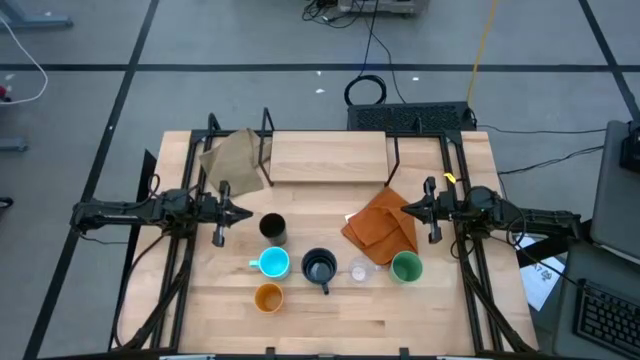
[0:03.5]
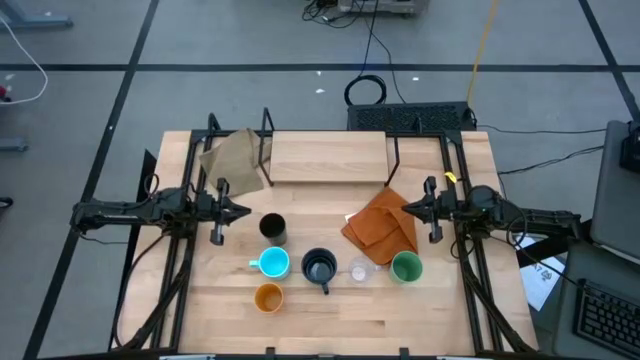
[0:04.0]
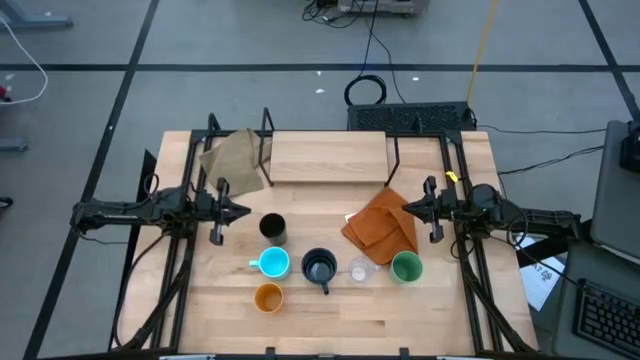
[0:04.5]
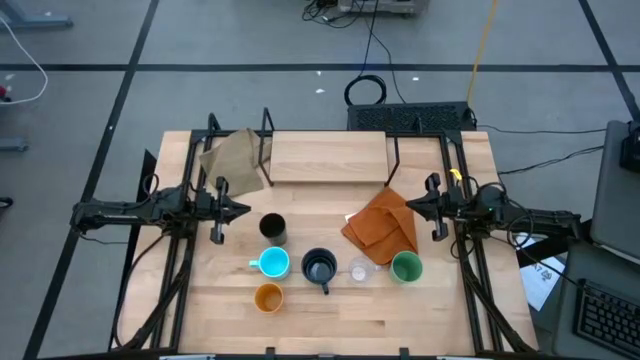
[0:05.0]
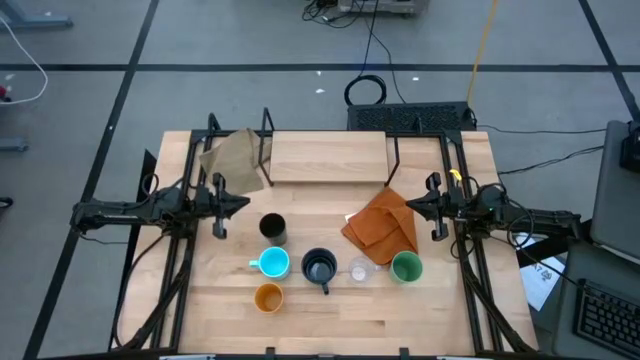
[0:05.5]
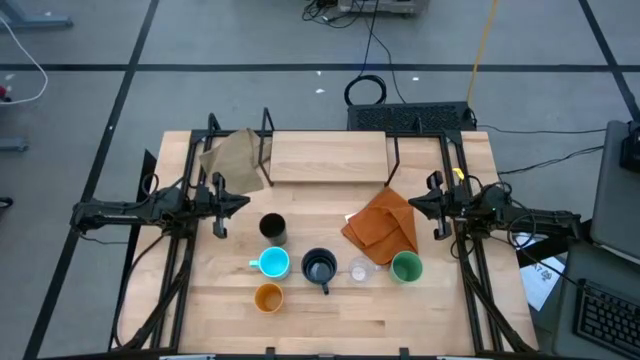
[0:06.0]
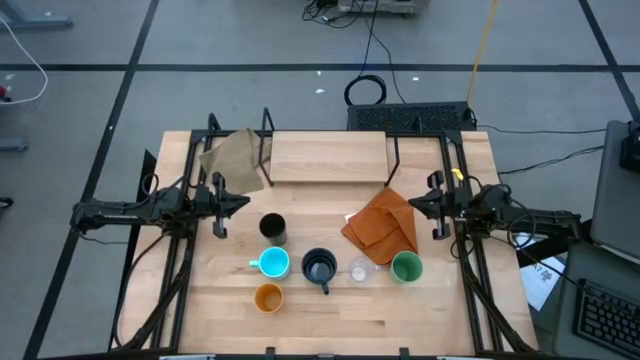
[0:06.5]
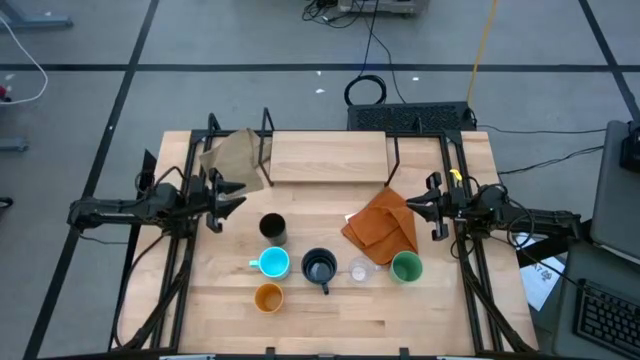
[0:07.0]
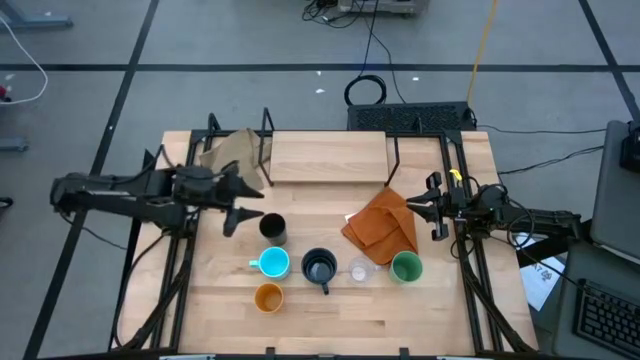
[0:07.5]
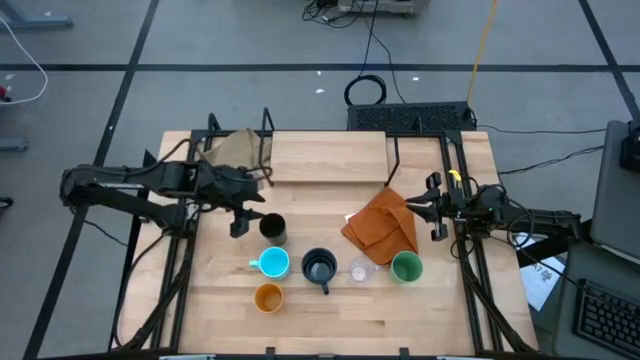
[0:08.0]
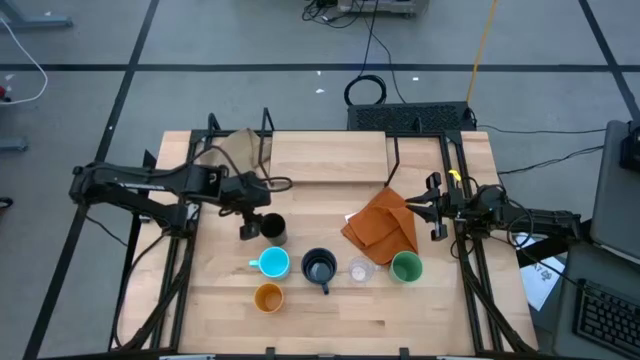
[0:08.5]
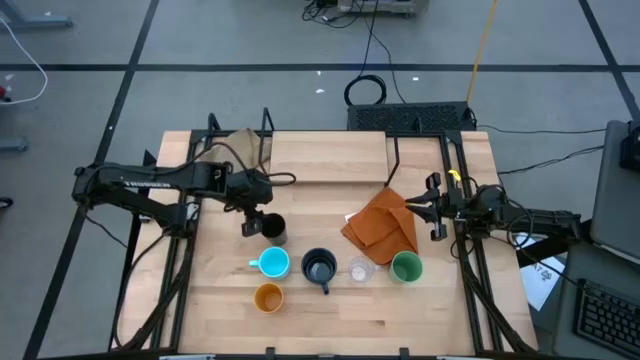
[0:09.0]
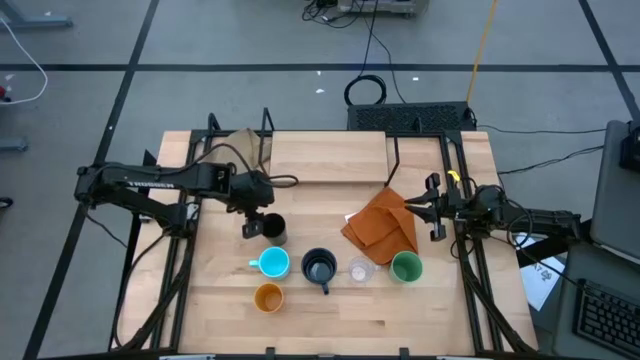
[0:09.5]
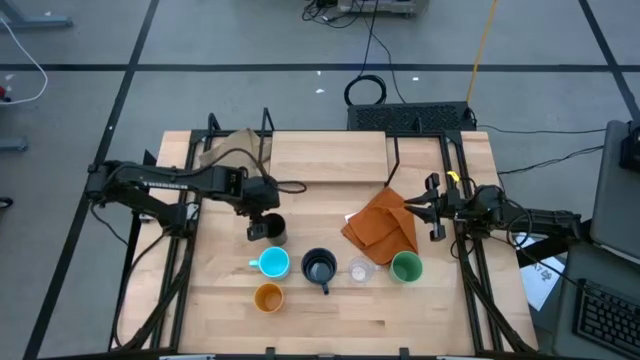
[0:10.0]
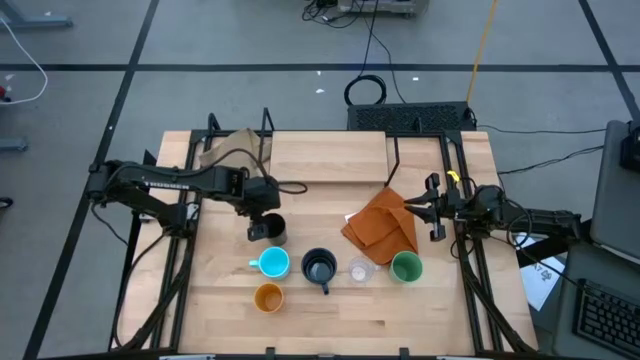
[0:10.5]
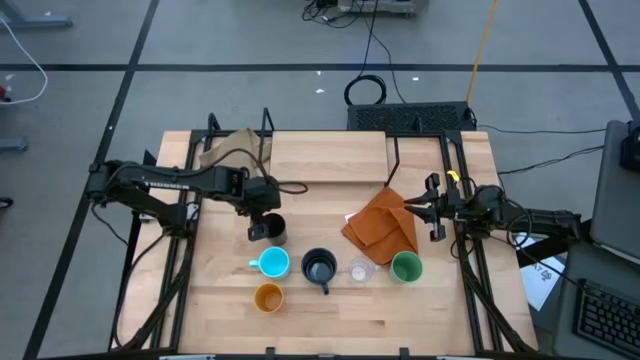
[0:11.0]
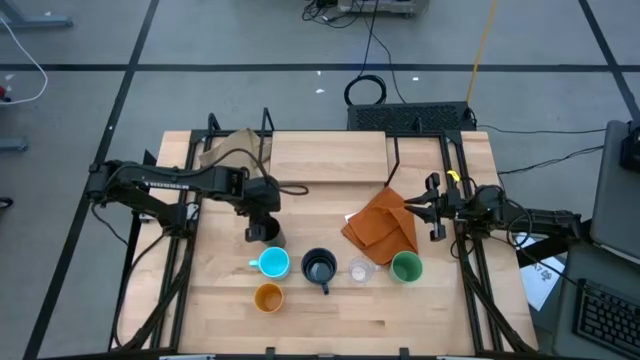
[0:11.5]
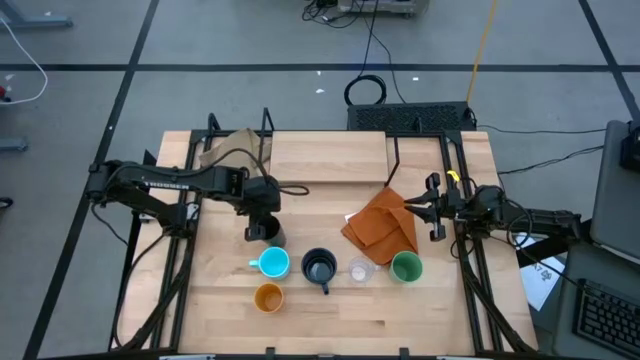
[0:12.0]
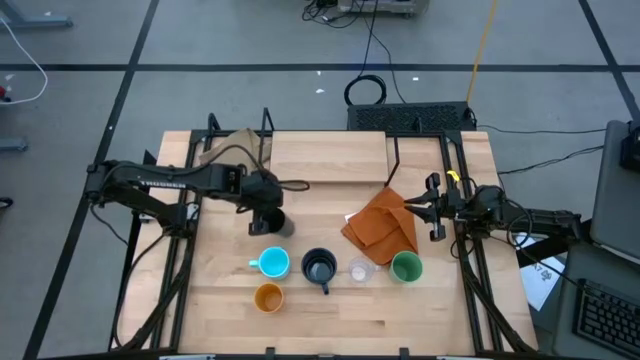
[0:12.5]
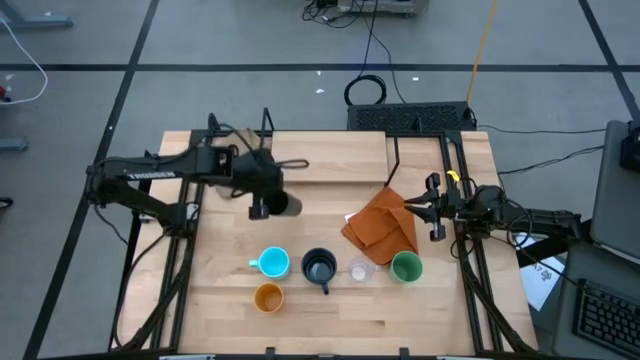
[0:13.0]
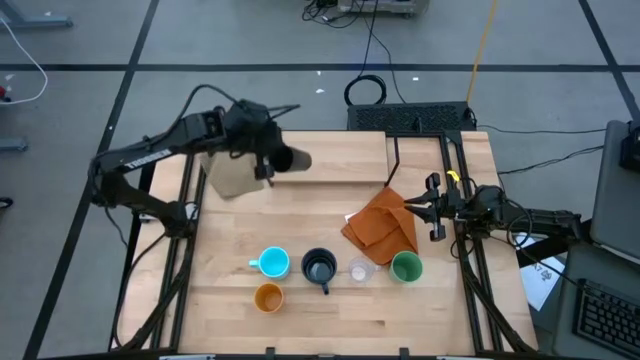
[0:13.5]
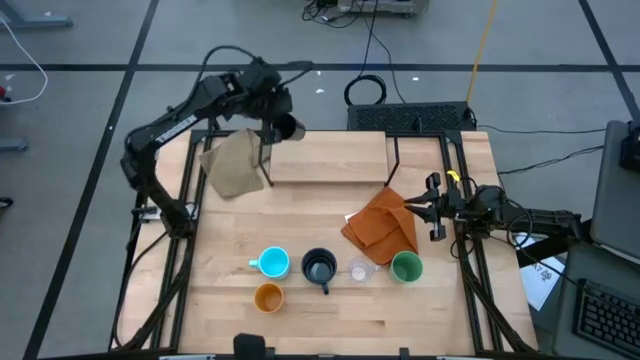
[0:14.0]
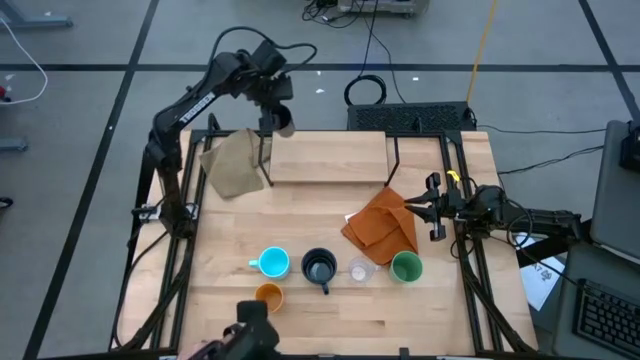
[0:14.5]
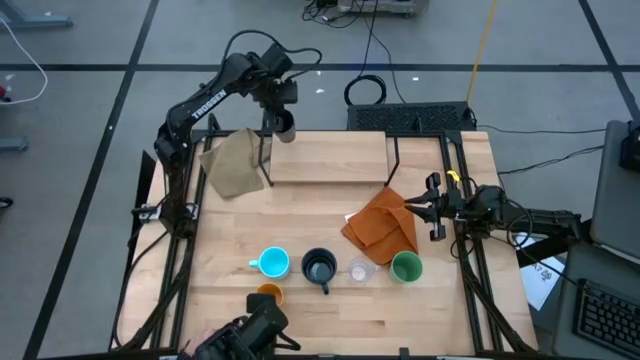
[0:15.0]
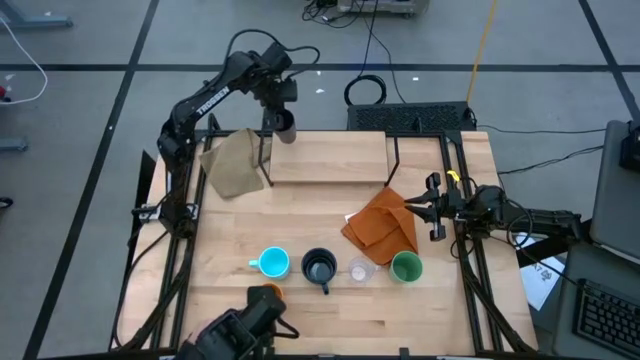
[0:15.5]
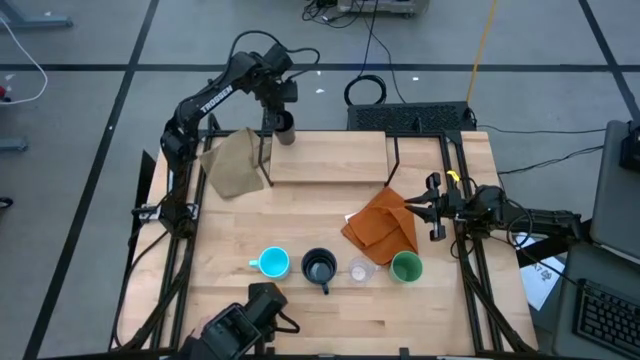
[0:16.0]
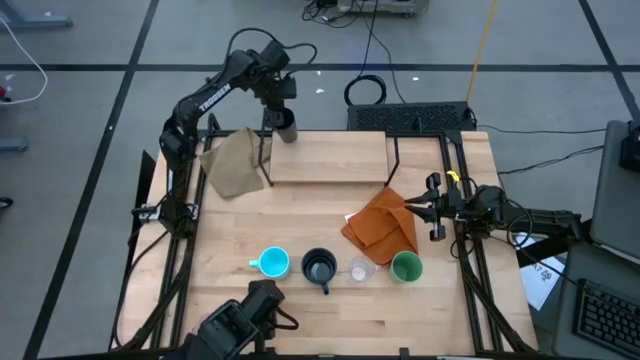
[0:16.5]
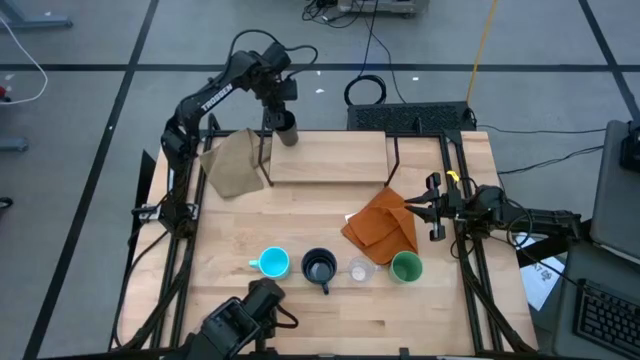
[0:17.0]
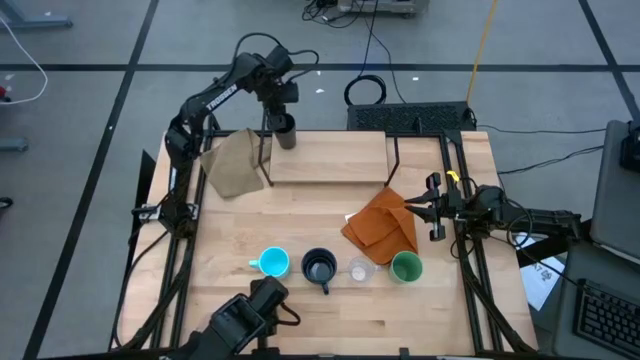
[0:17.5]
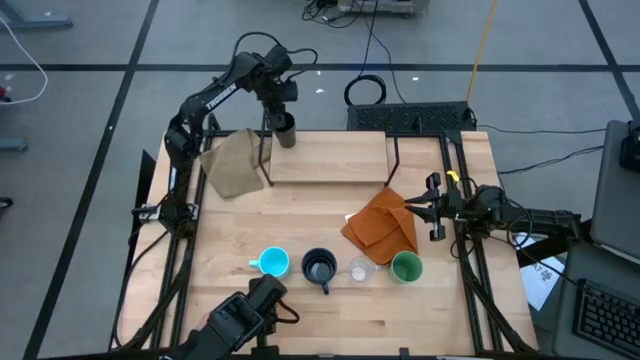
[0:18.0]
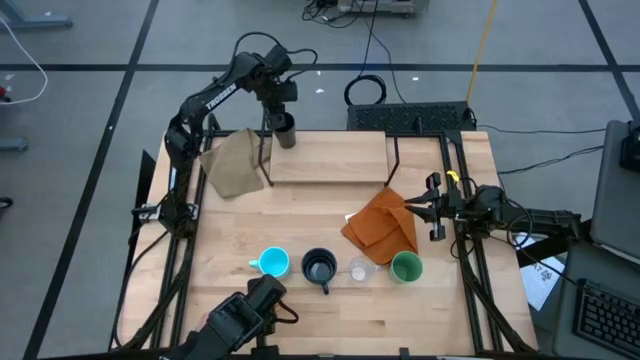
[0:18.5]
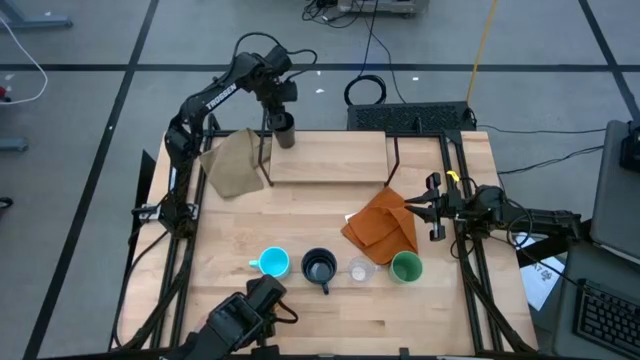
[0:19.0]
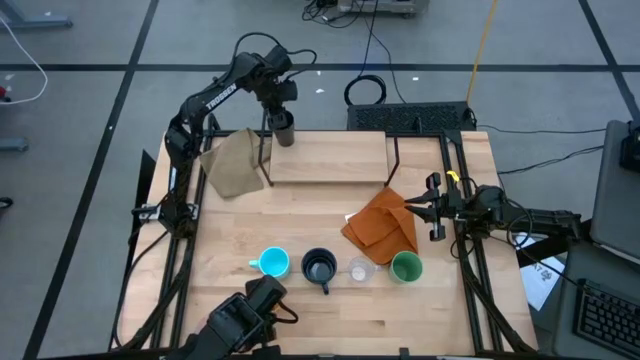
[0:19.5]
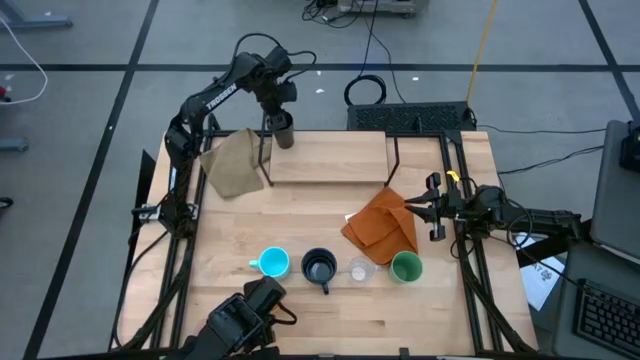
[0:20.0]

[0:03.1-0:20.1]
Task: Stack small to large cups/mugs on shelf
Put the black cup on the shelf

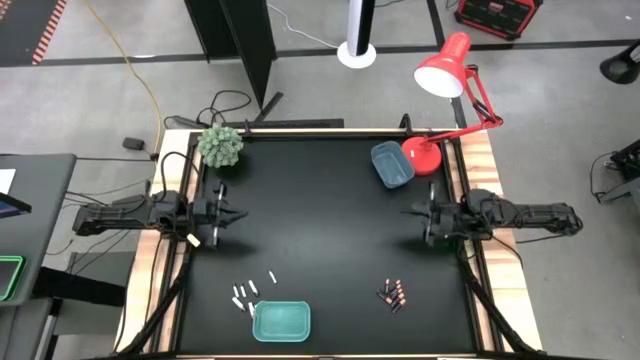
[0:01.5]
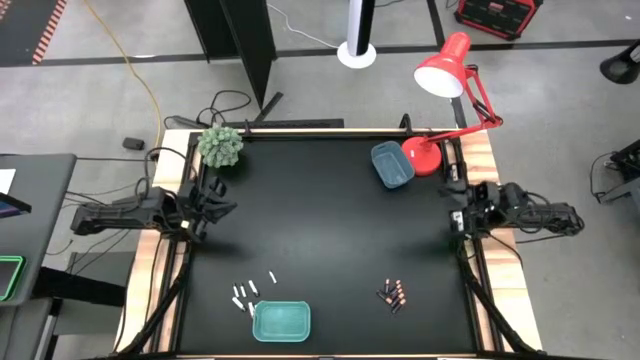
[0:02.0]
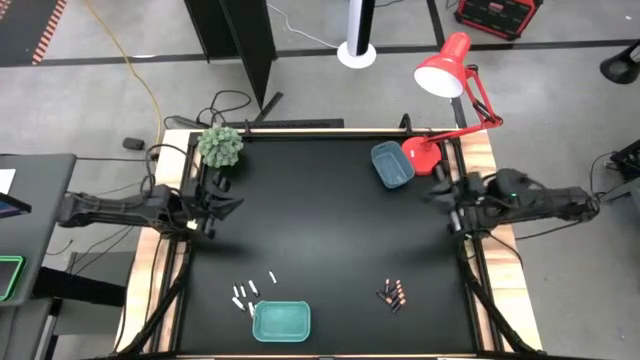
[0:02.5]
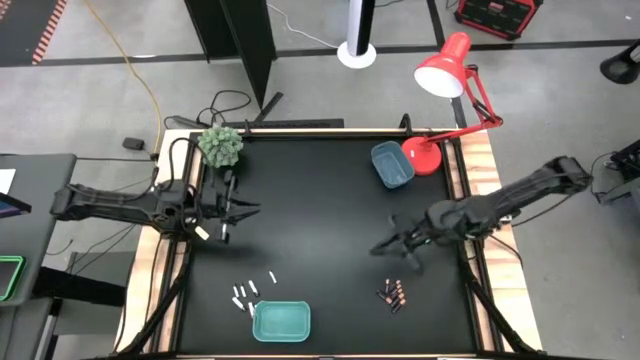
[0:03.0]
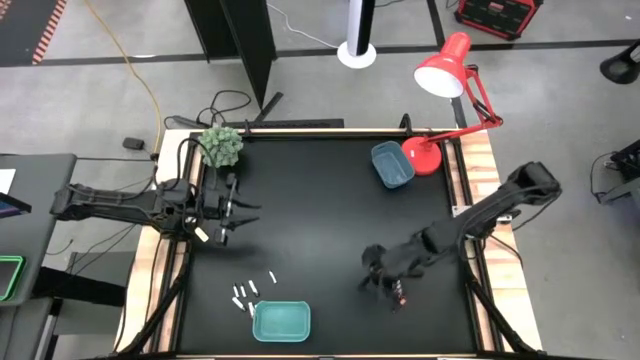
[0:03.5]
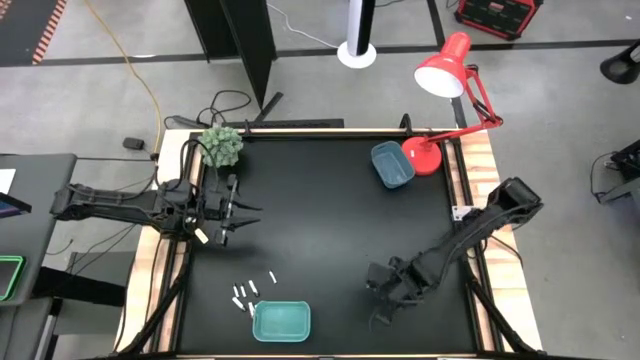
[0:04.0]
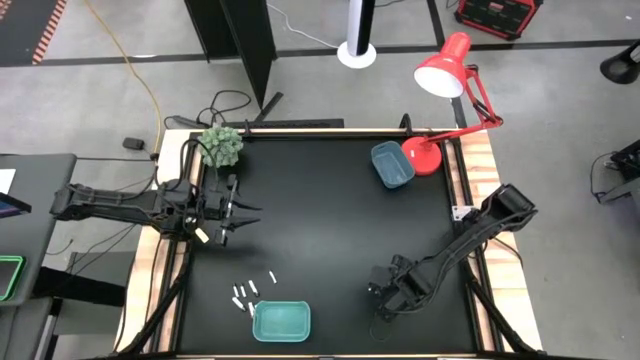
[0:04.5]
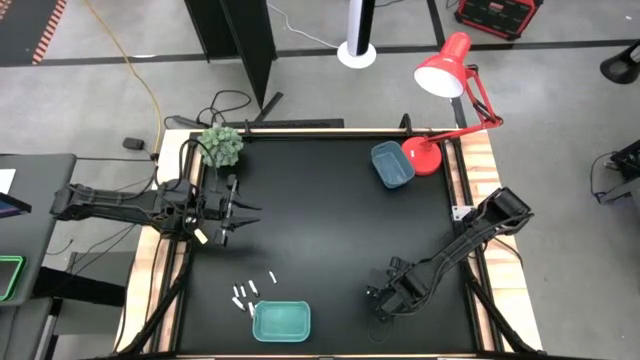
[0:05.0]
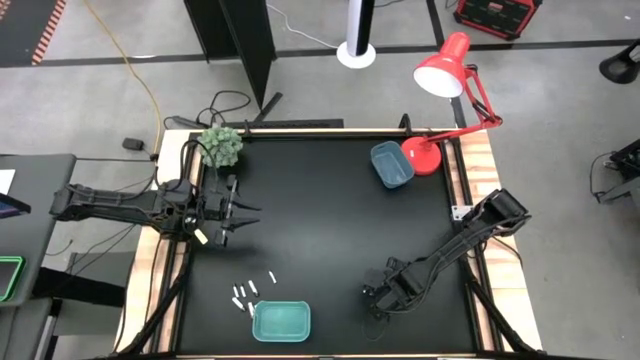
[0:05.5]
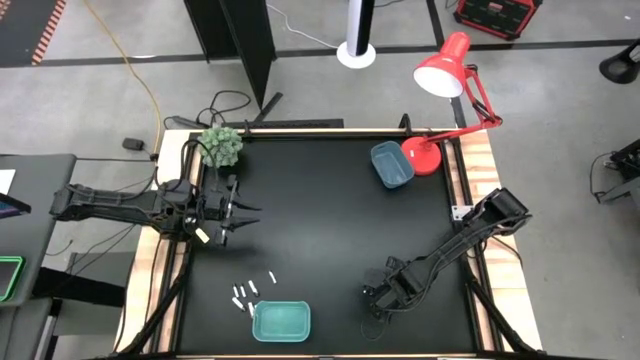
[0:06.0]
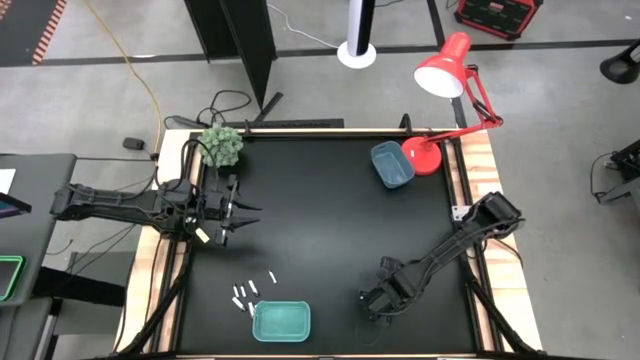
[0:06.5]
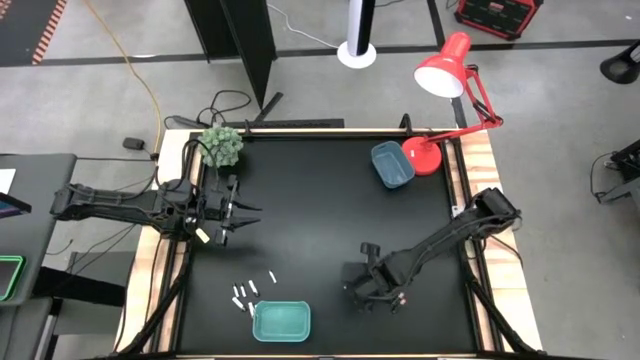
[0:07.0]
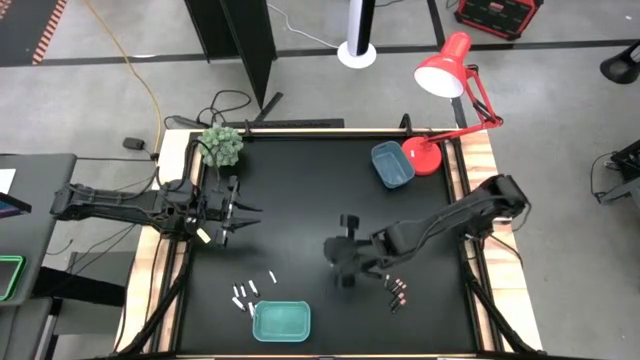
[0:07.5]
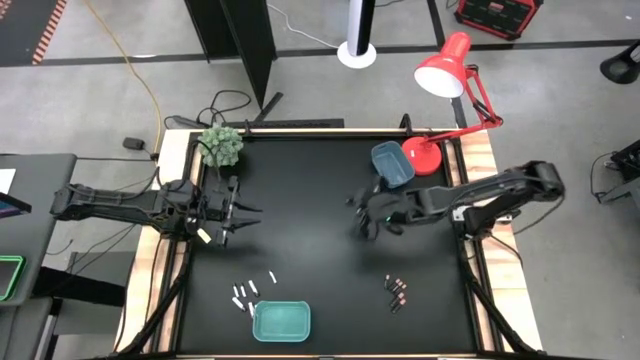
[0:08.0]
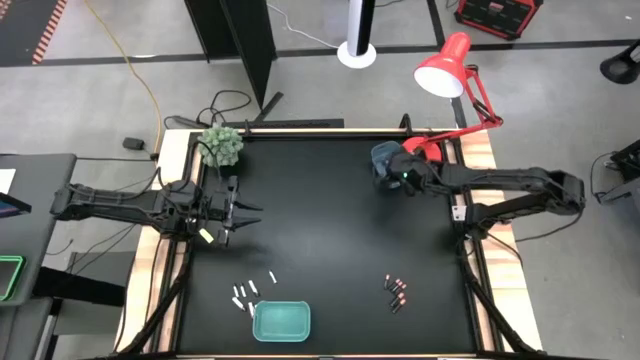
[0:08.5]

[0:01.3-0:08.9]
Task: Sort batteries
Put the black battery into the blue bin
